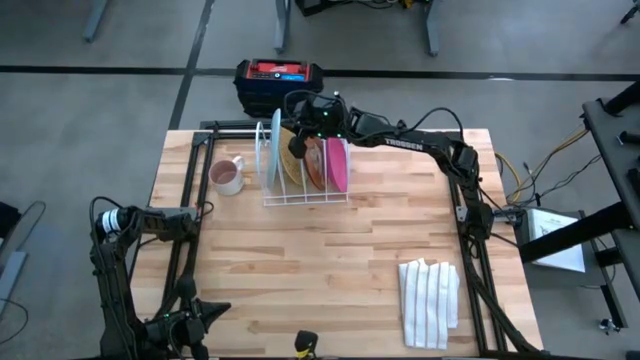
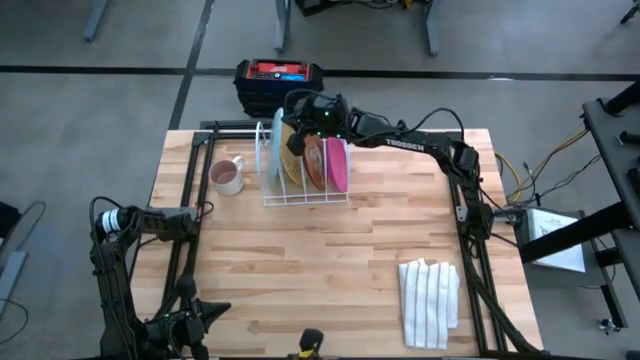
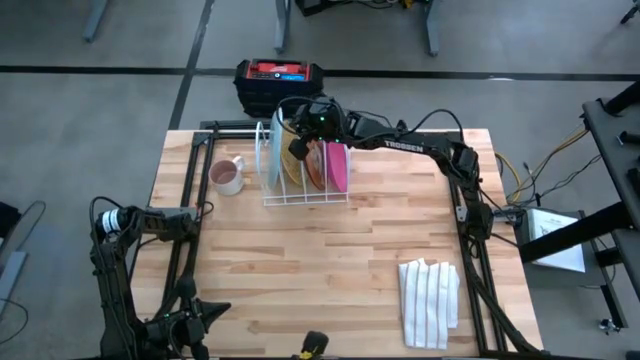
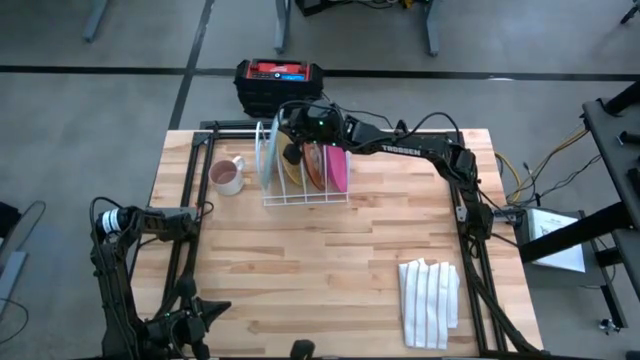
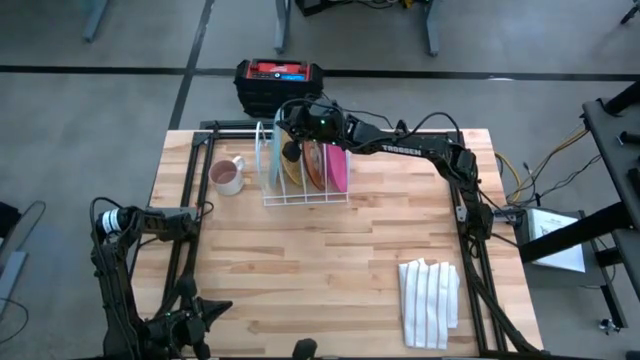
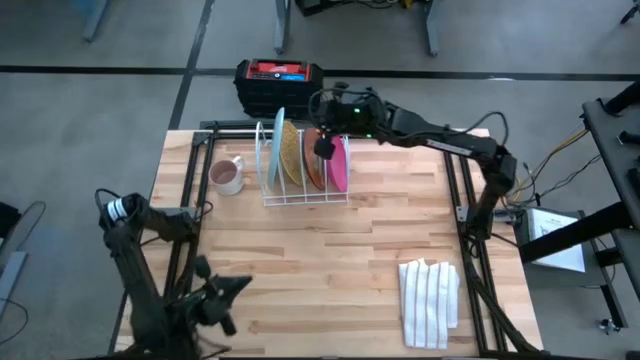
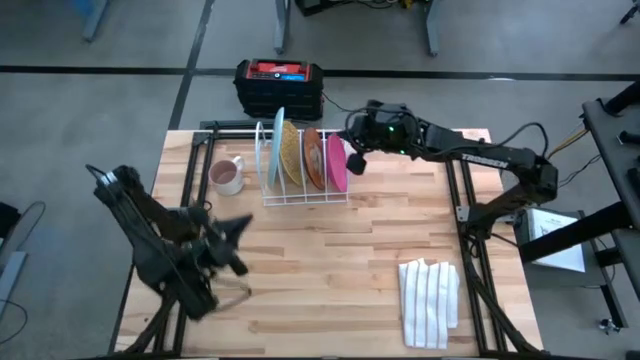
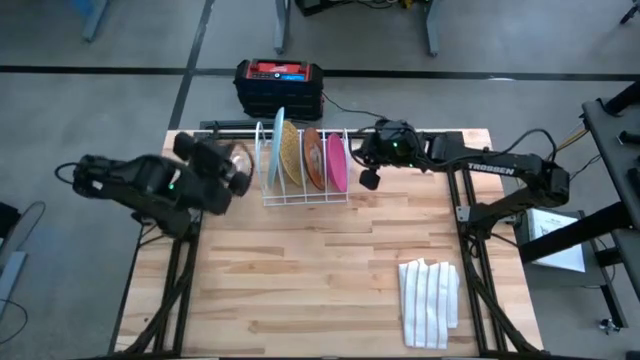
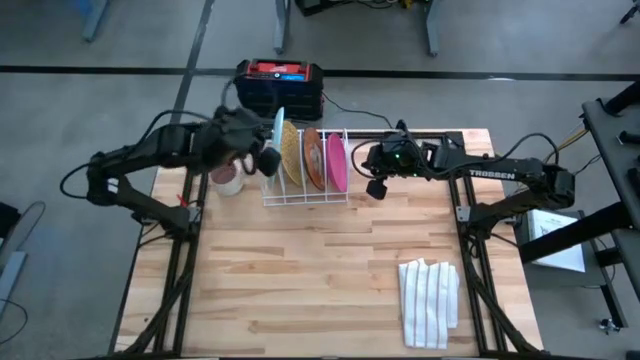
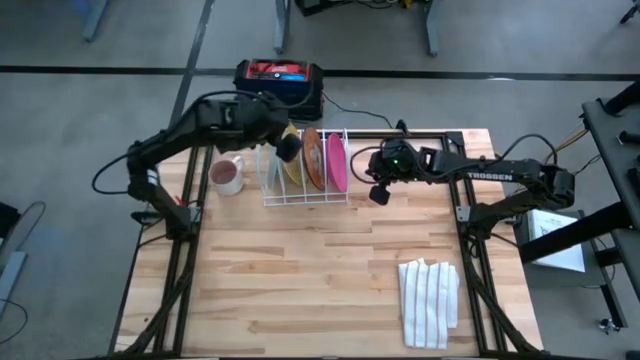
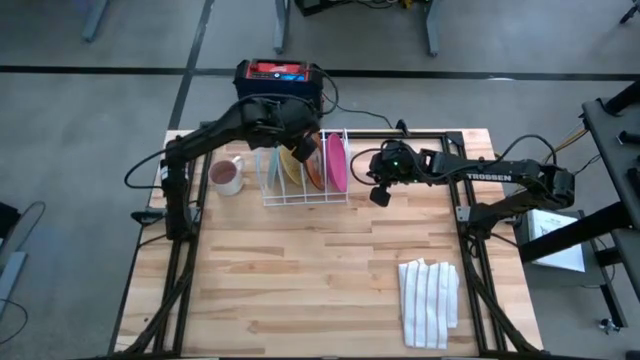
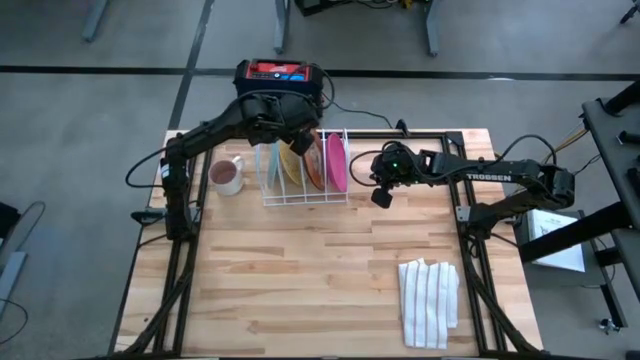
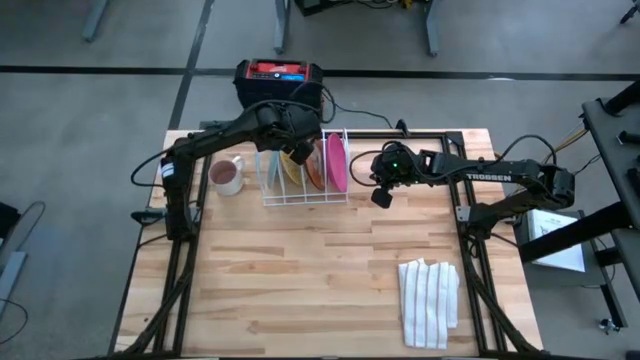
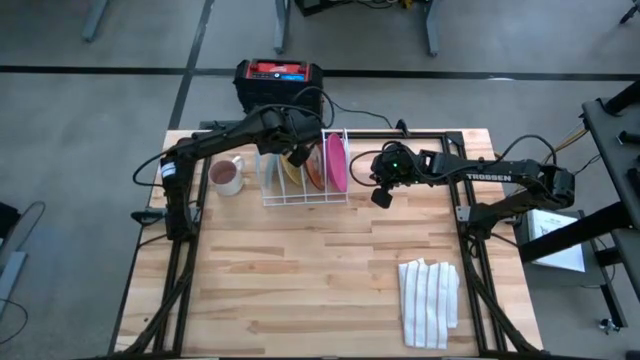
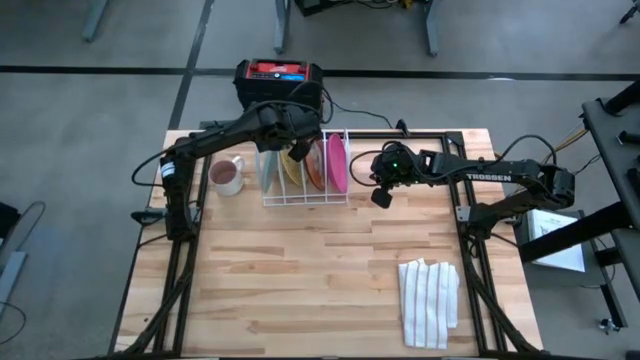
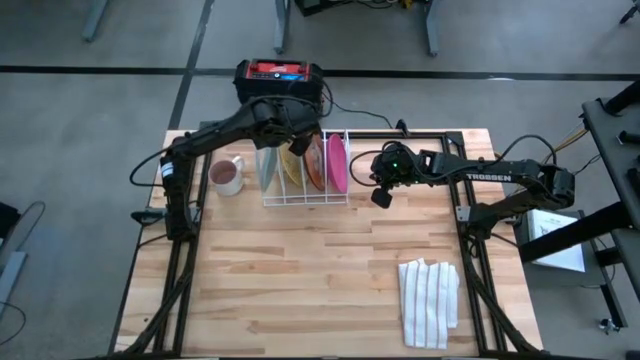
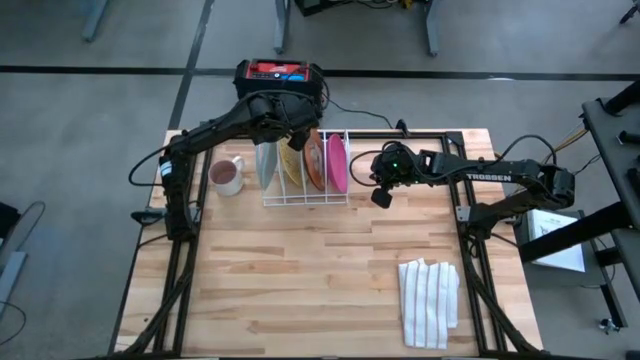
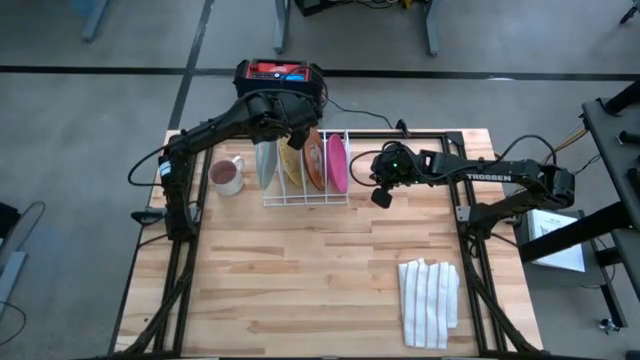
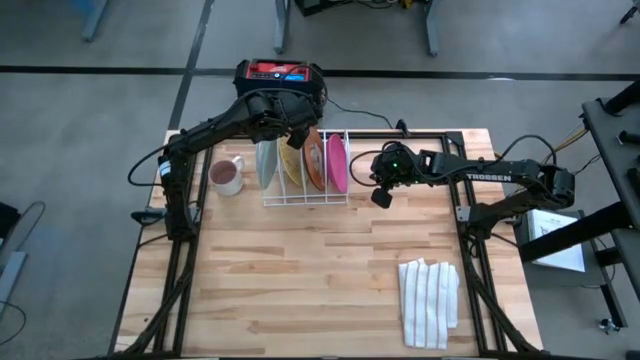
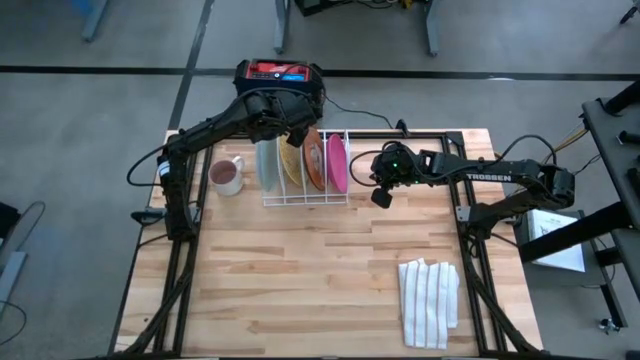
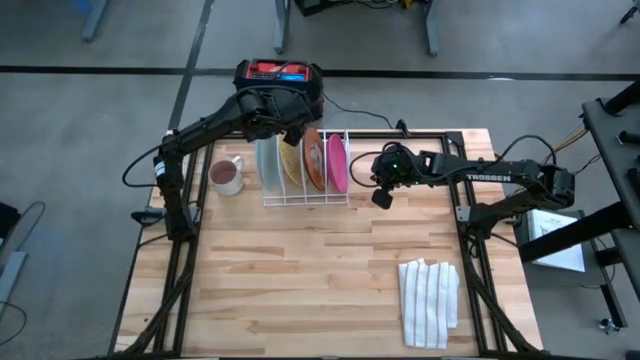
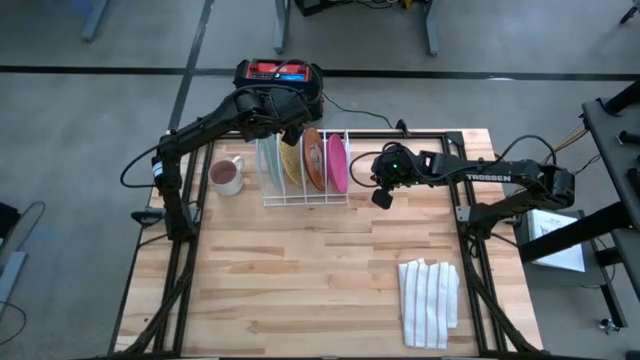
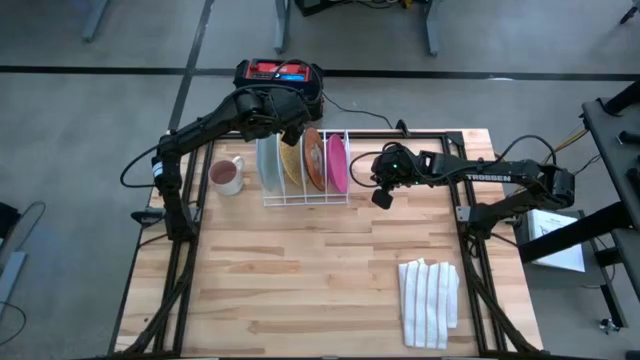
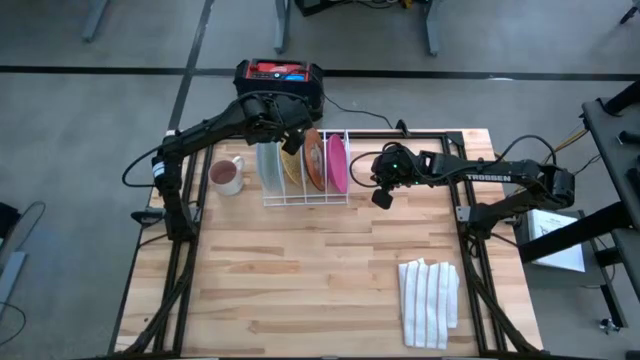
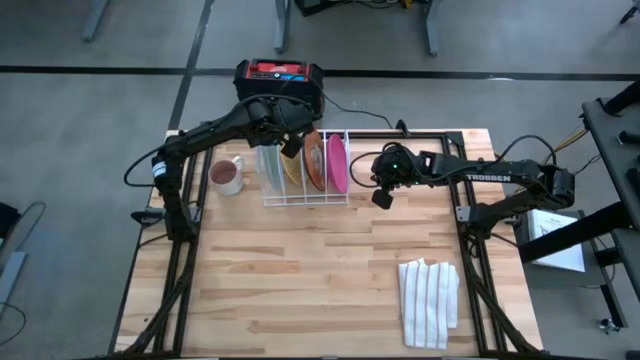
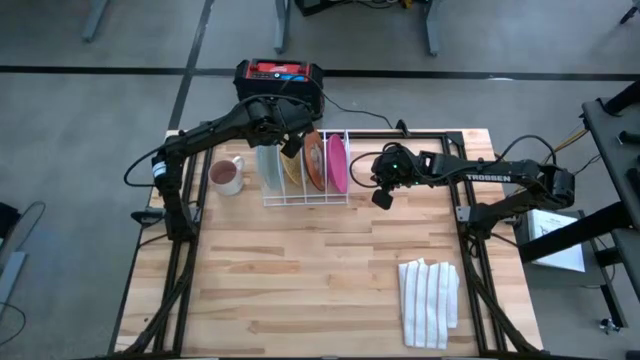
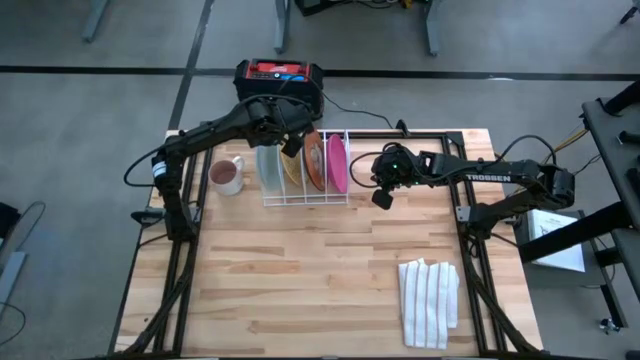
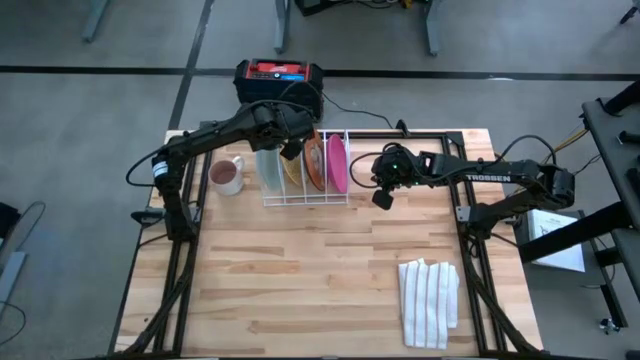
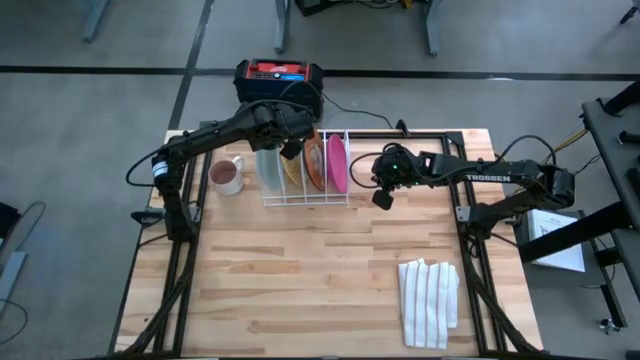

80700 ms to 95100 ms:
Task: Sort dishes
Put the blue plate into the dish rack

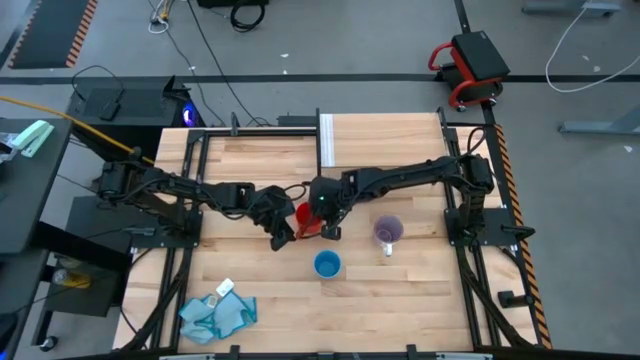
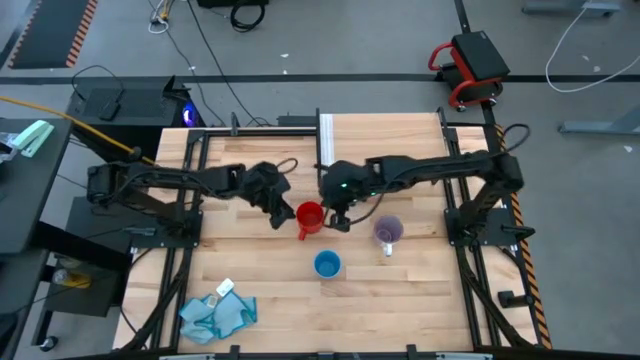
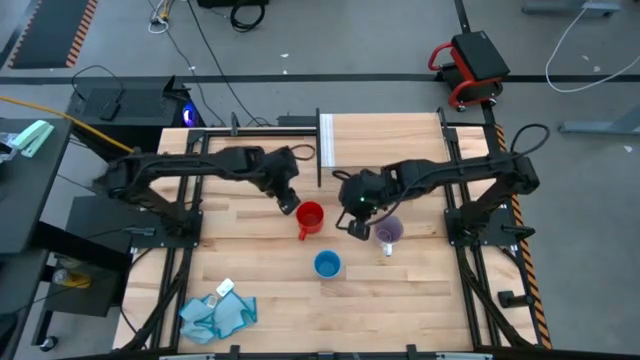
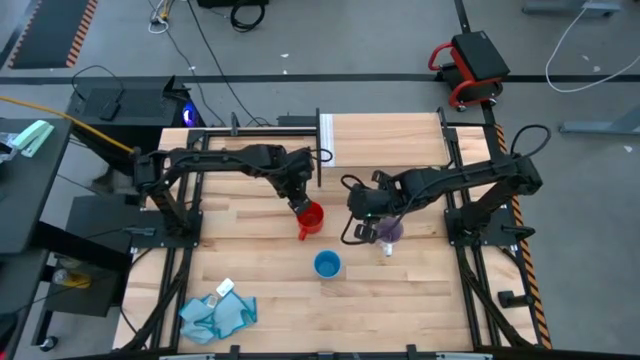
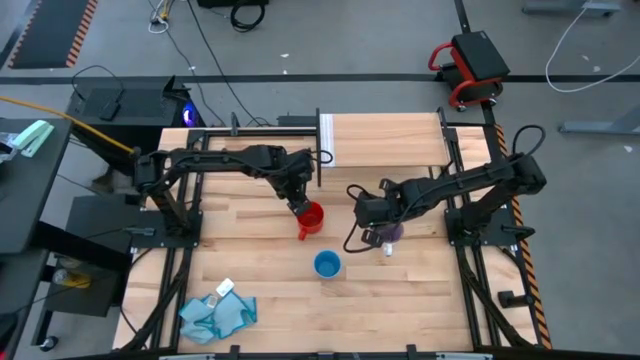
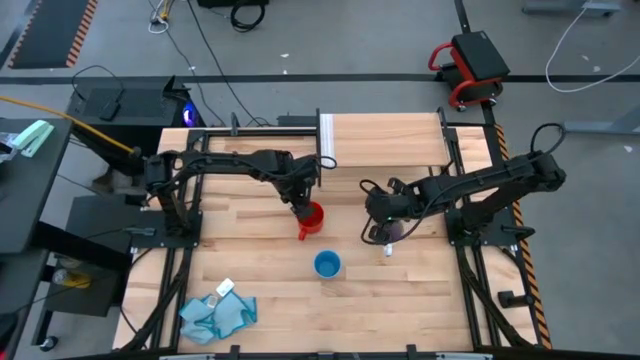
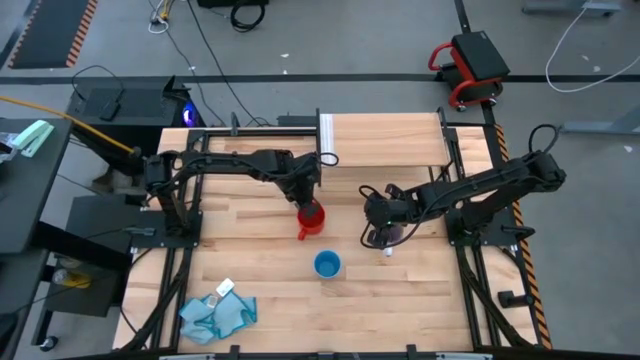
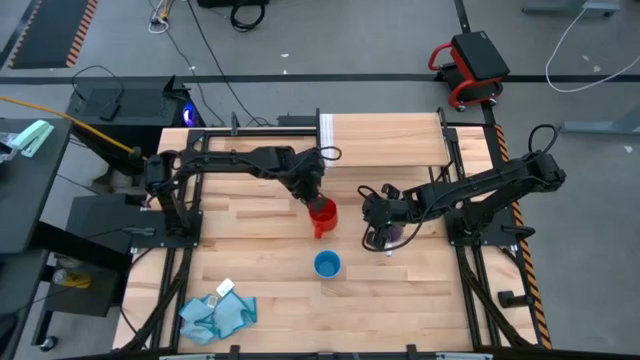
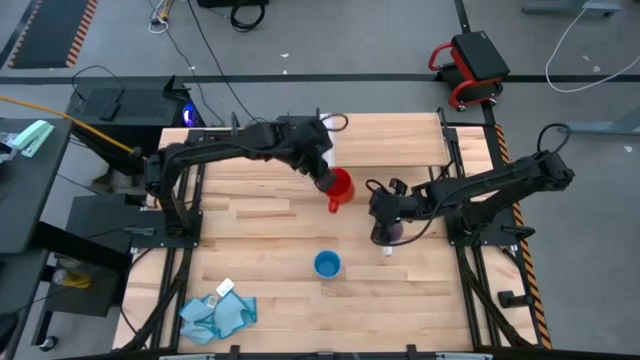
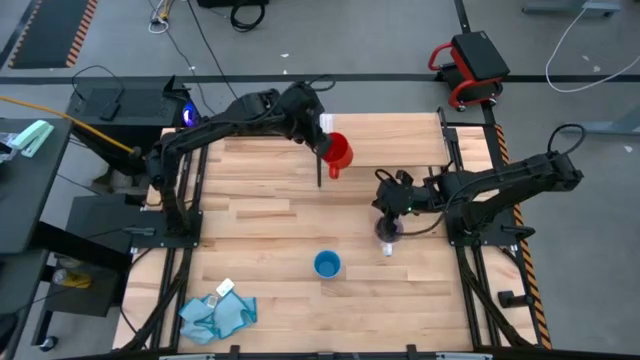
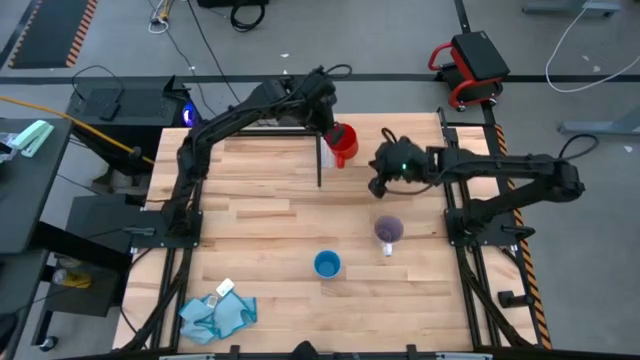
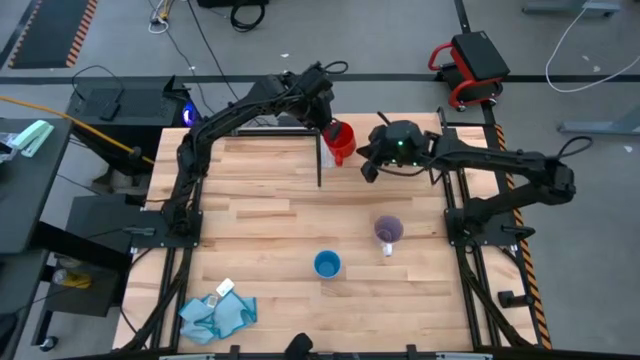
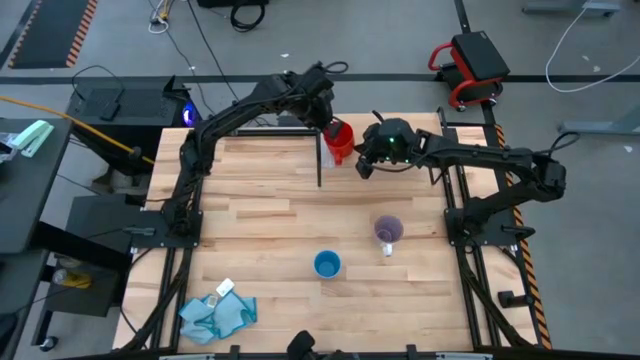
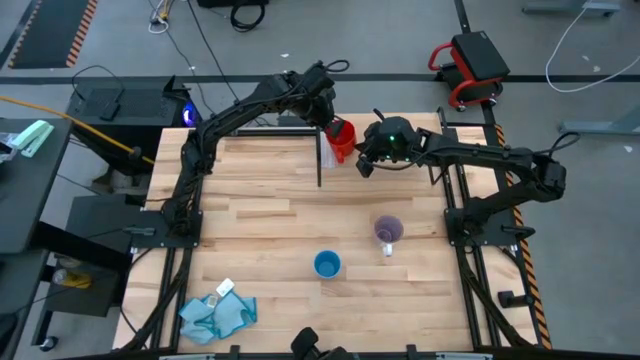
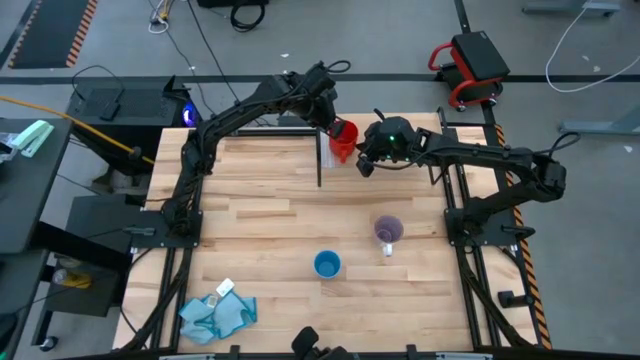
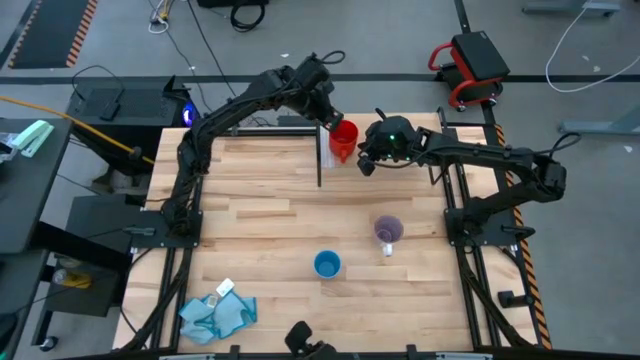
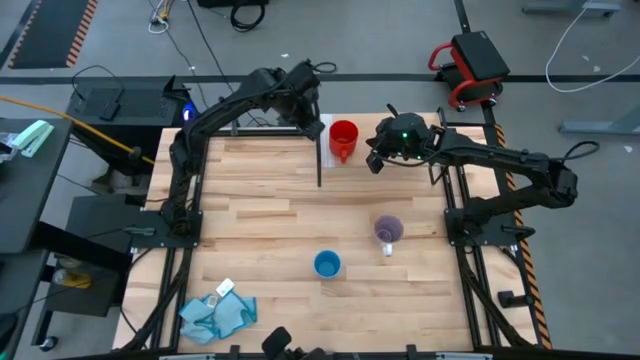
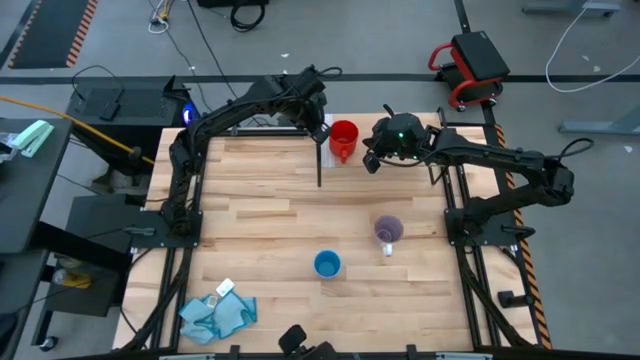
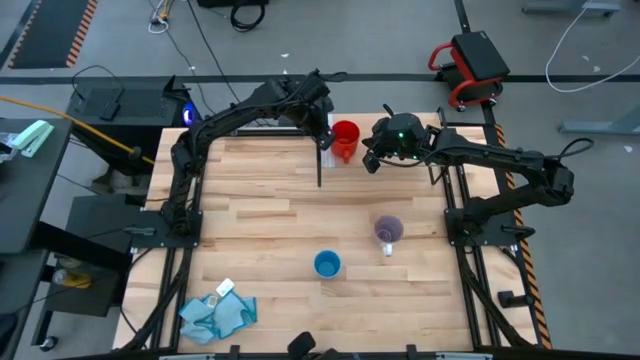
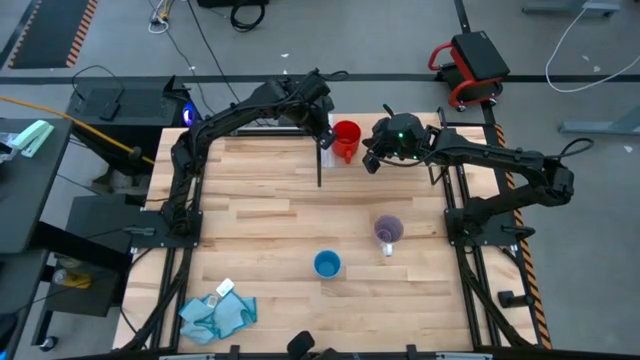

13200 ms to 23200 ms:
Task: Stack small to large cups/mugs on shelf
Put the red mug on the shelf
